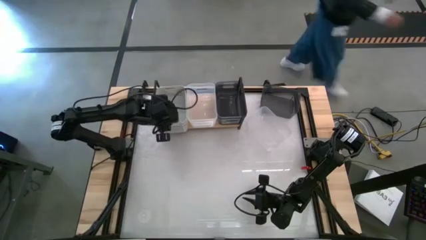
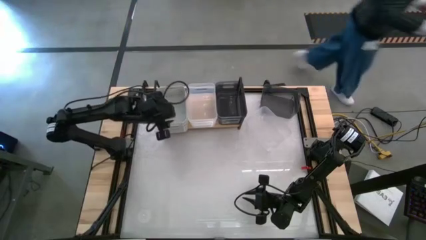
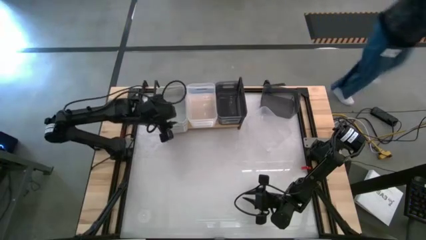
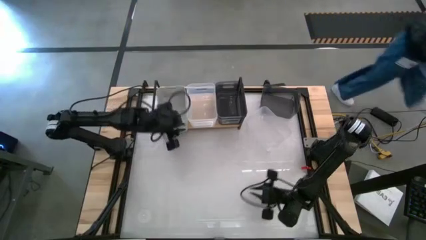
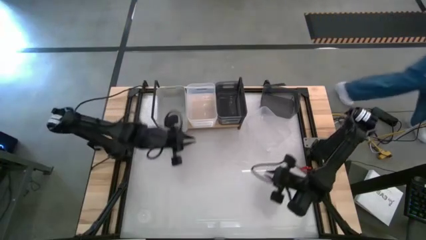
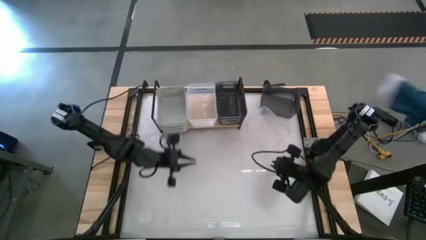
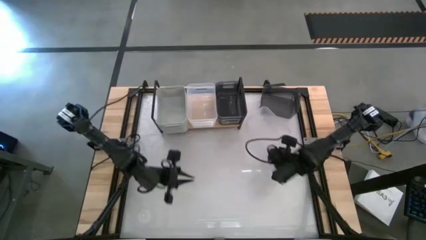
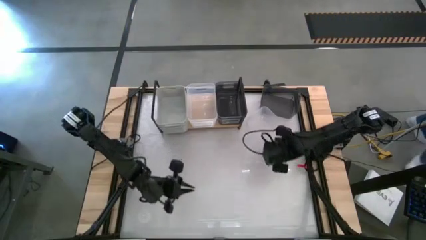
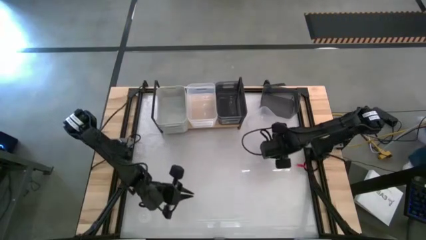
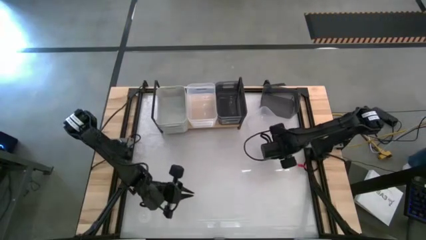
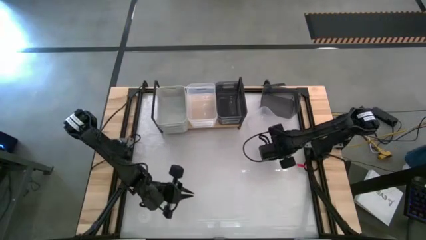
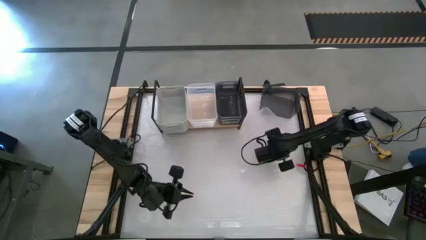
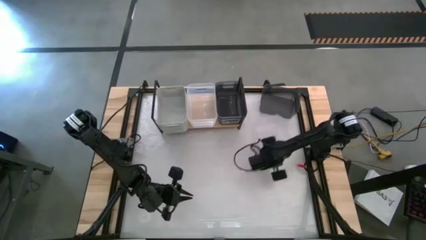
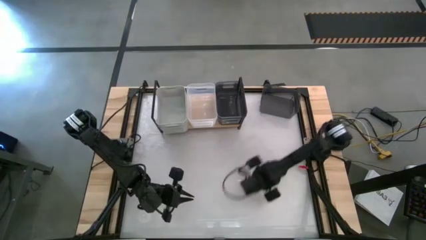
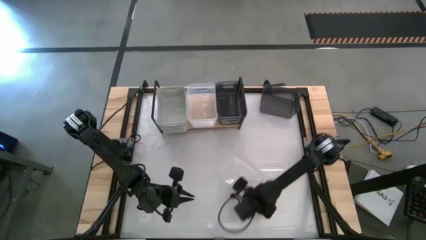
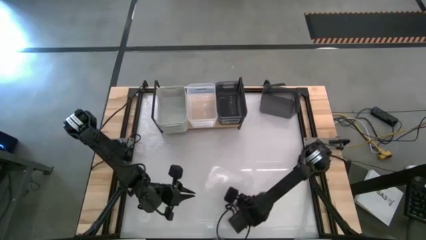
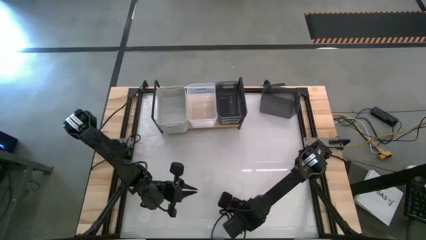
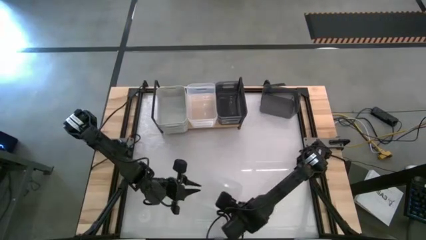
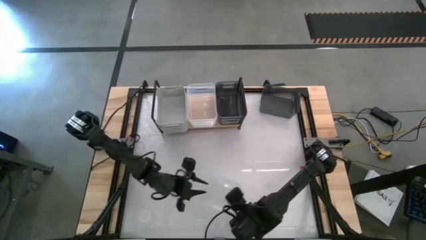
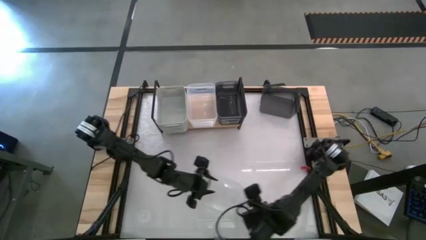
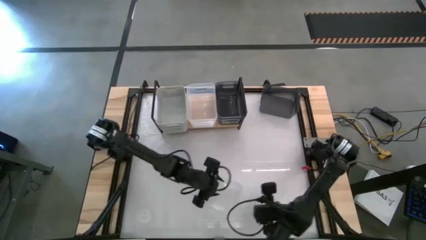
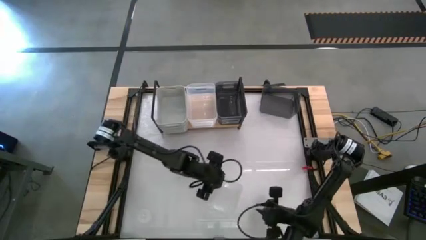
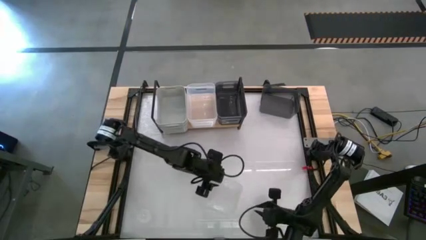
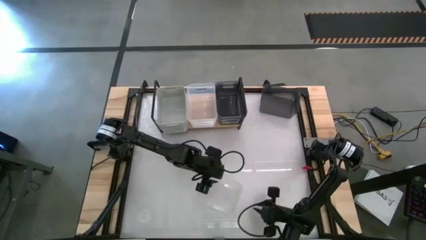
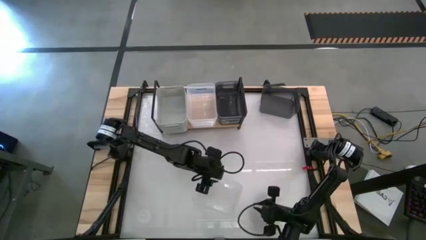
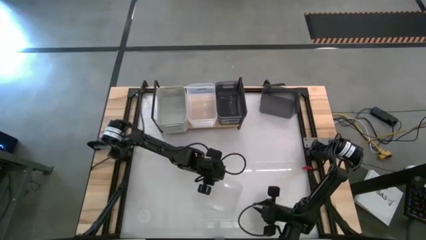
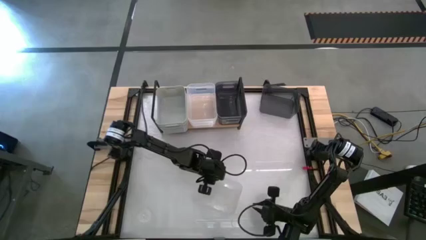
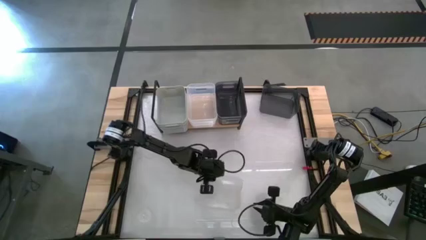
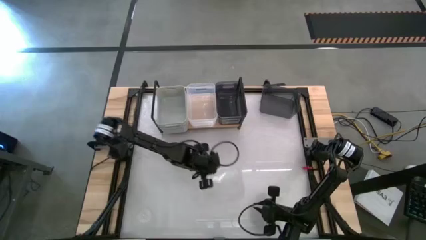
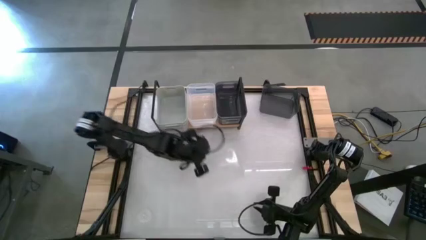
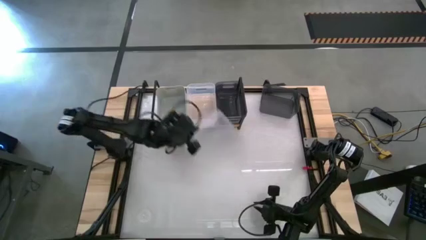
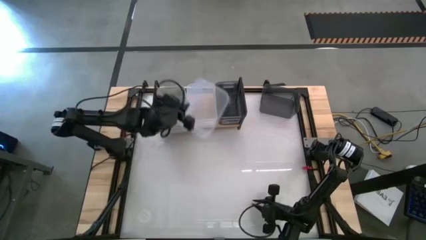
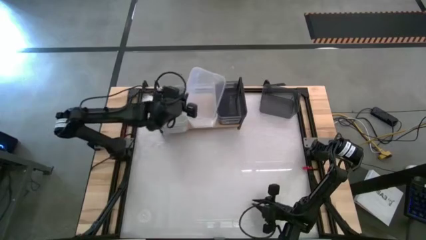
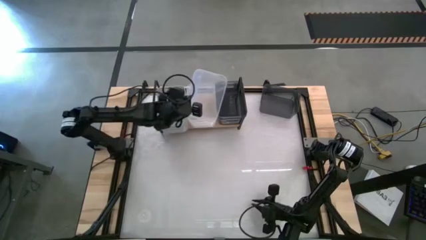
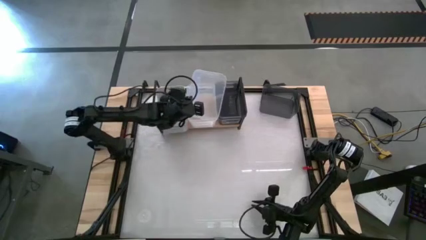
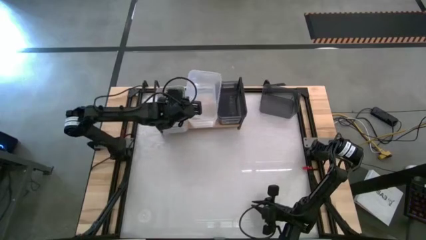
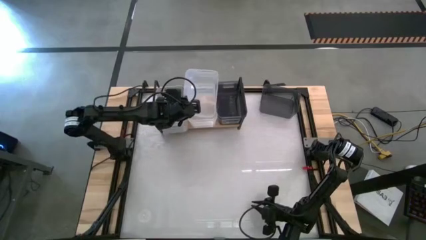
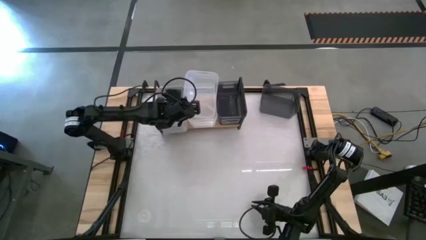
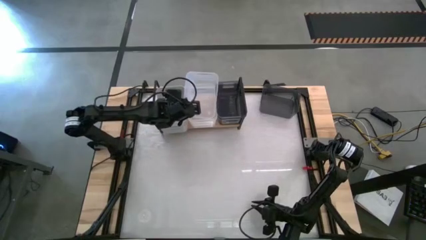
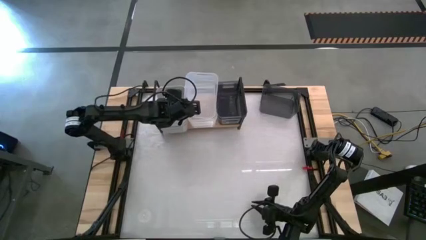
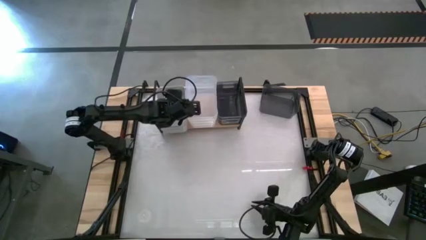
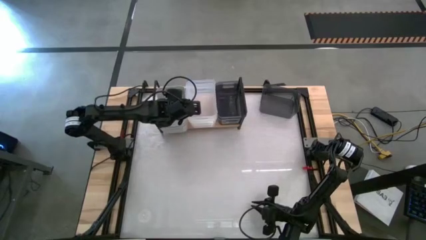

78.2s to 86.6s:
Task: Stack baskets on shelf by color
Stack the transparent bin on top of the transparent bin on the shelf

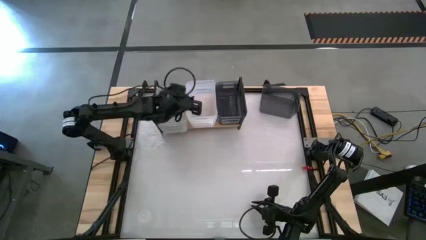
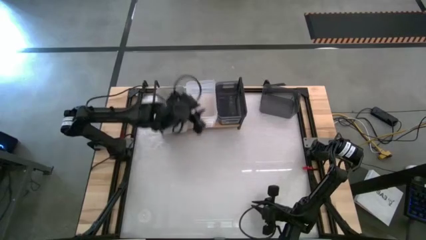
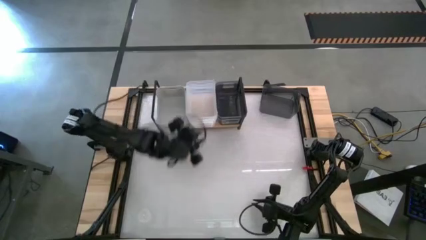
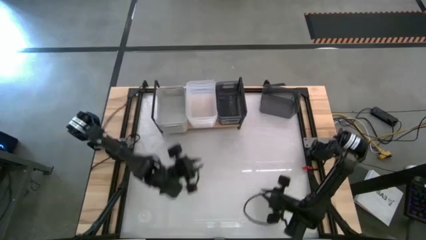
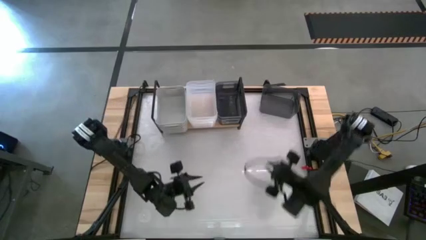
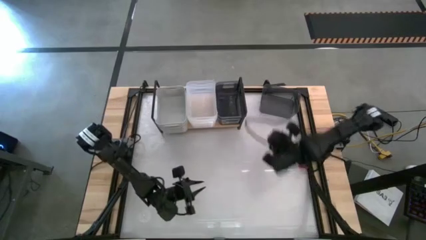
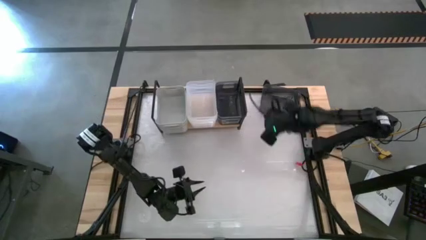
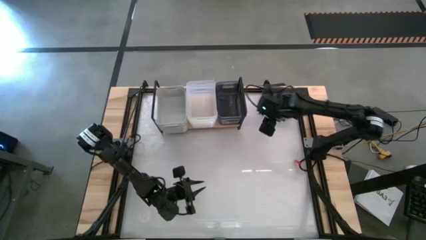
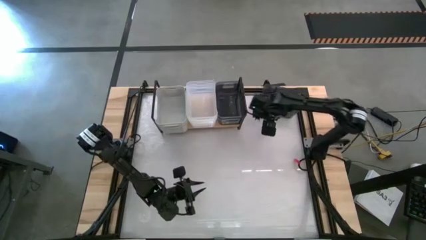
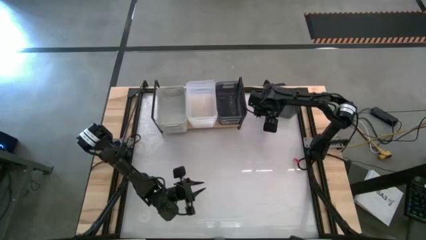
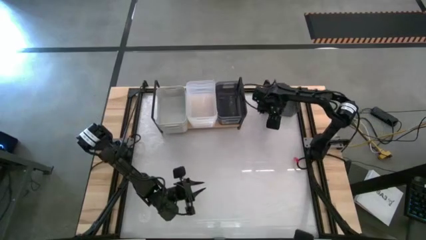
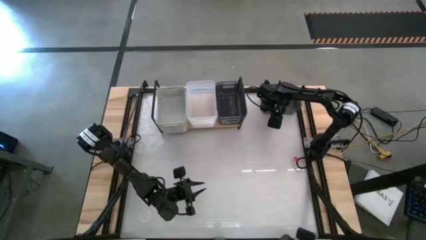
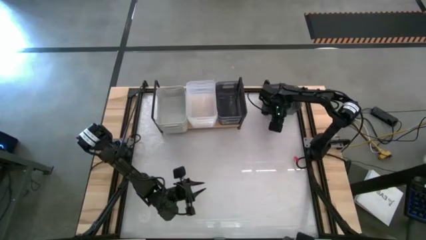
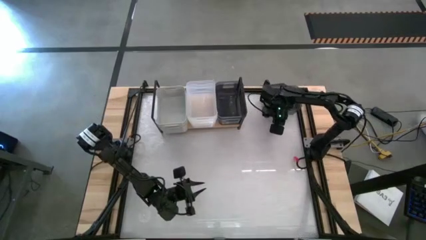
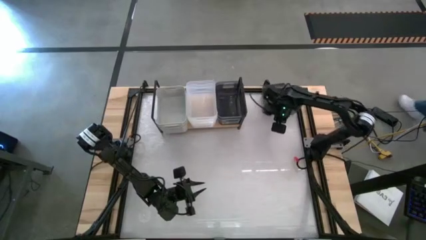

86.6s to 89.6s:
Stack the black bin on top of the other black bin on the shelf

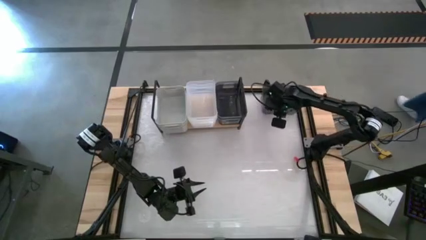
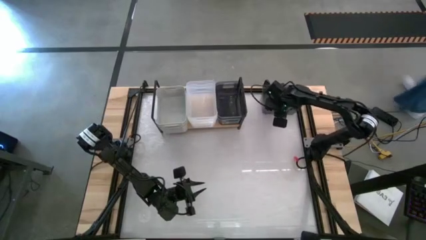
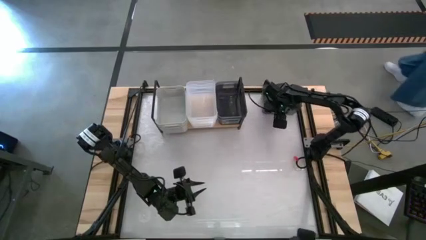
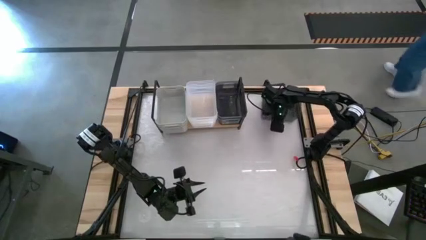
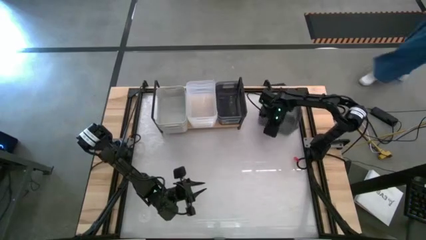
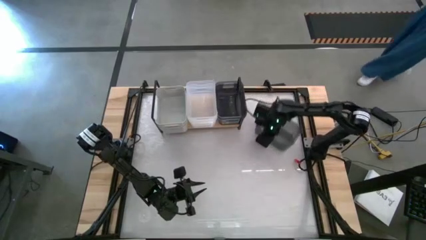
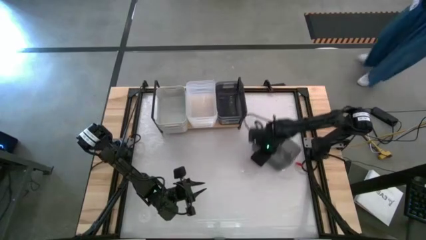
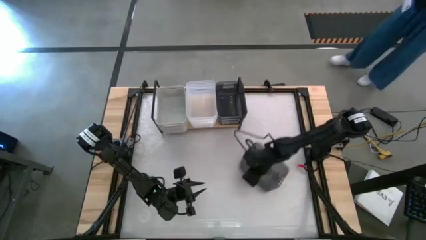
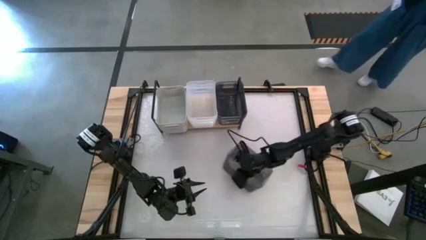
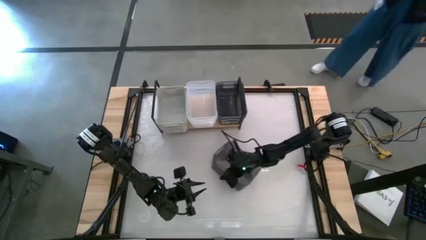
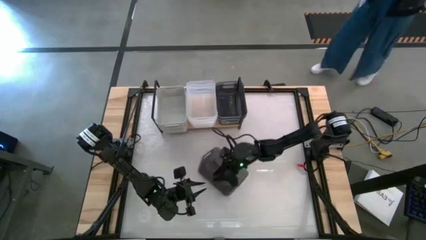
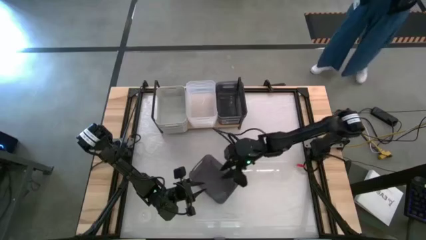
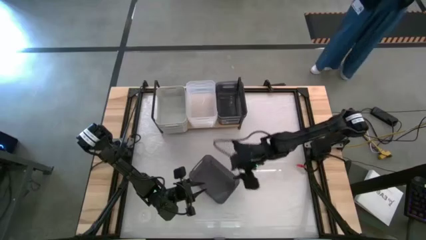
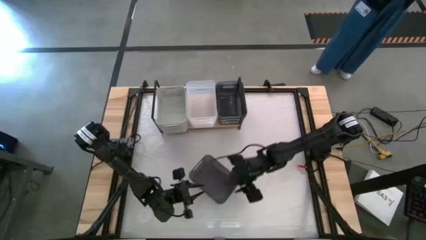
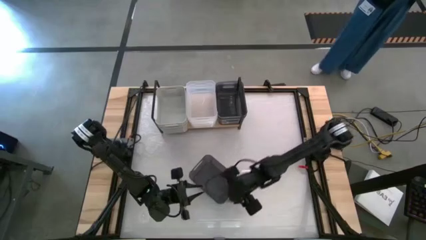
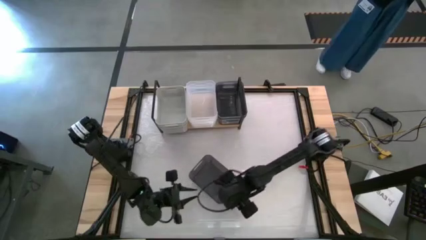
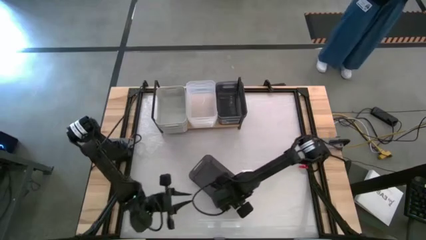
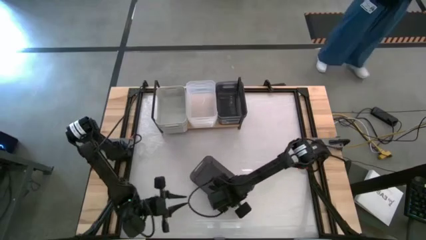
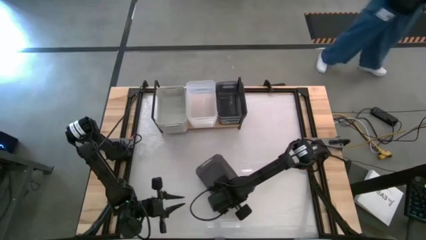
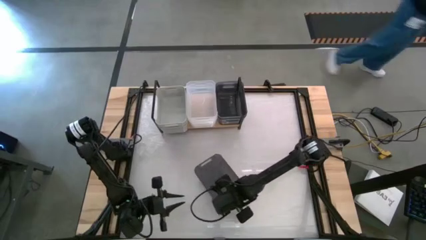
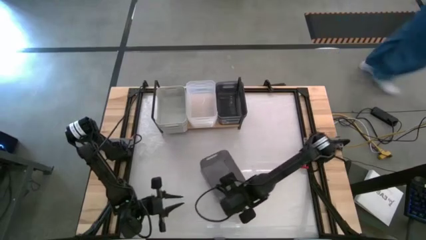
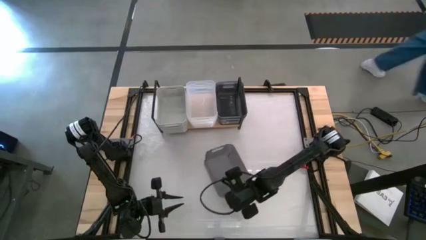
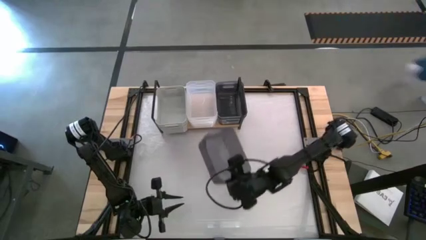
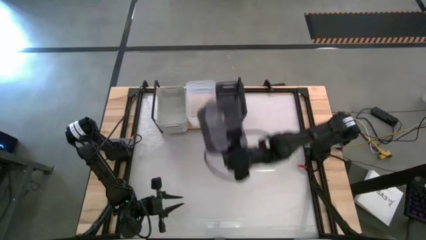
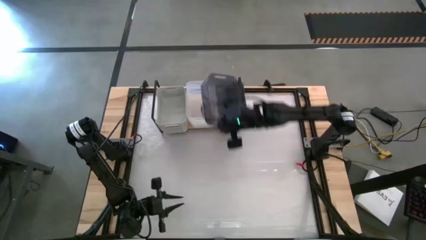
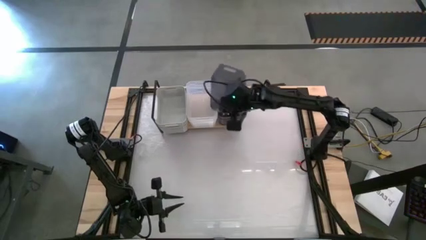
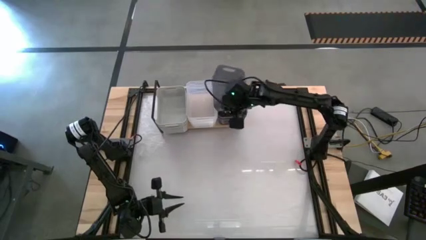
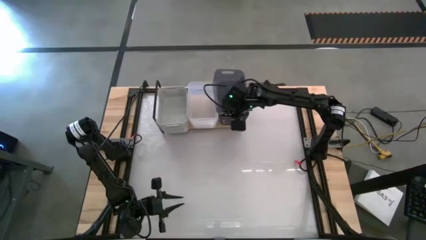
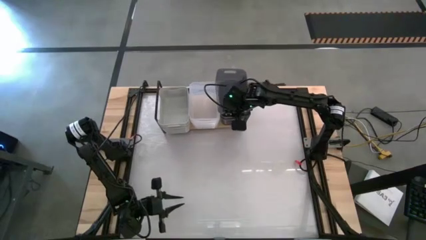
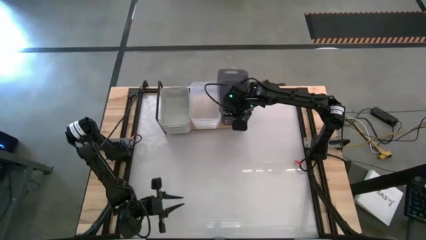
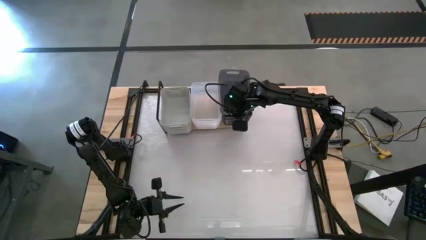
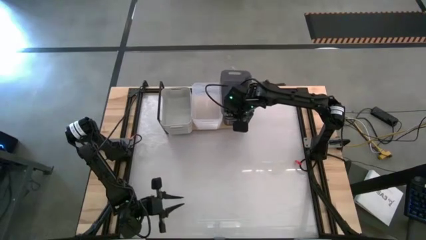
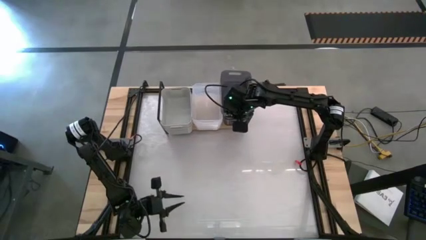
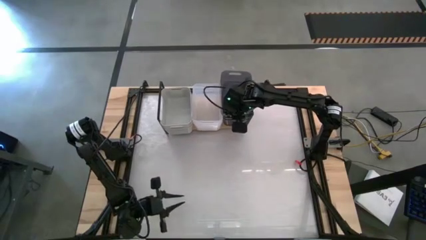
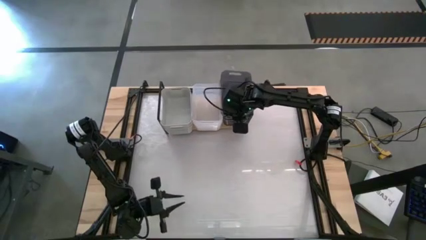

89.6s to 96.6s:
Stack the black bin on top of the other black bin on the shelf
